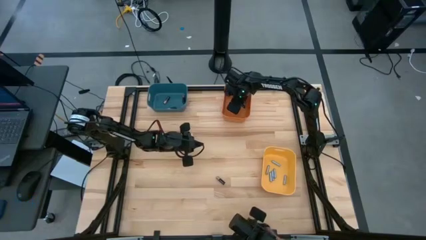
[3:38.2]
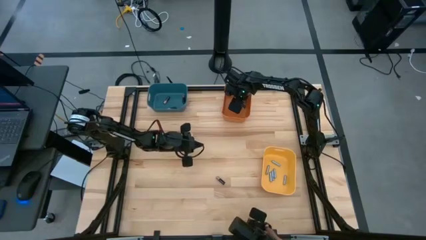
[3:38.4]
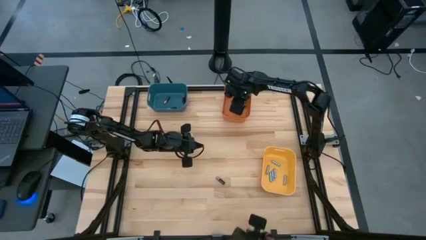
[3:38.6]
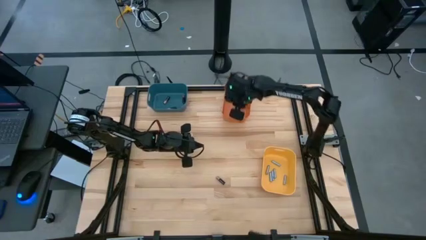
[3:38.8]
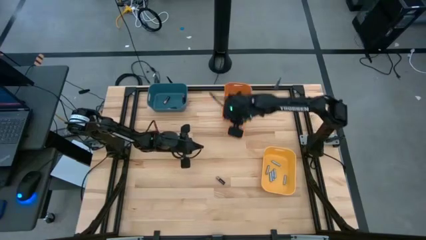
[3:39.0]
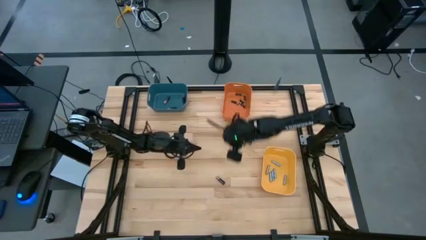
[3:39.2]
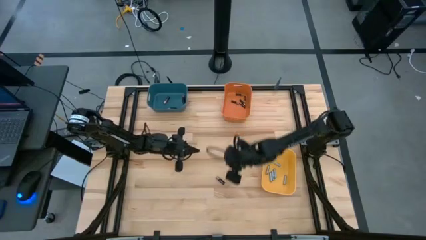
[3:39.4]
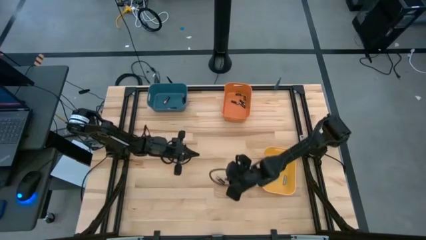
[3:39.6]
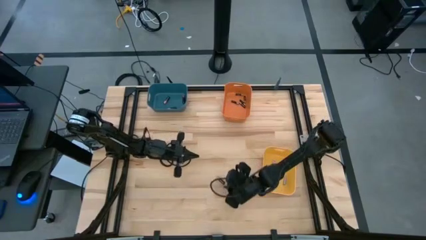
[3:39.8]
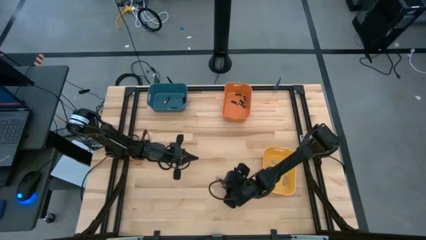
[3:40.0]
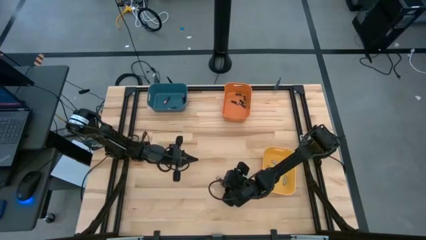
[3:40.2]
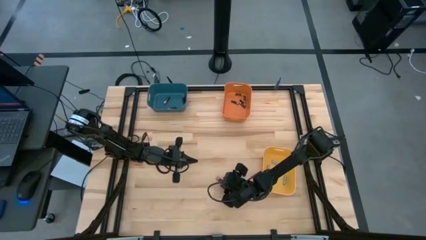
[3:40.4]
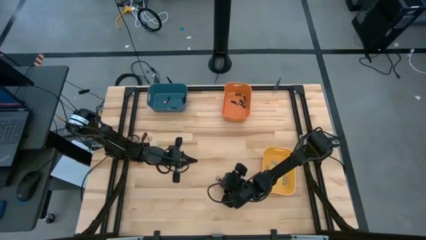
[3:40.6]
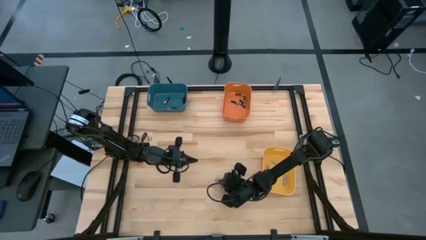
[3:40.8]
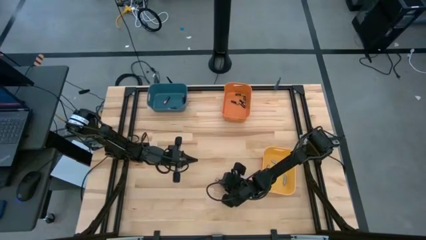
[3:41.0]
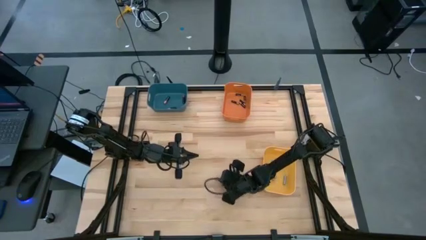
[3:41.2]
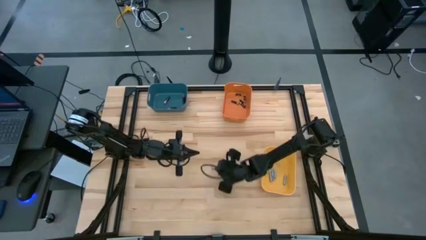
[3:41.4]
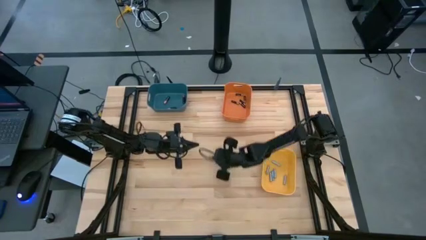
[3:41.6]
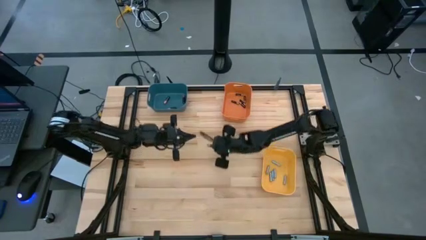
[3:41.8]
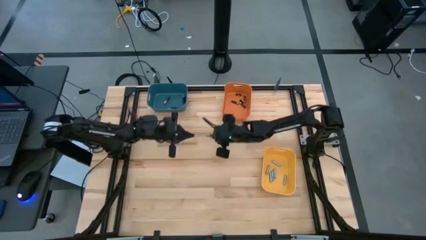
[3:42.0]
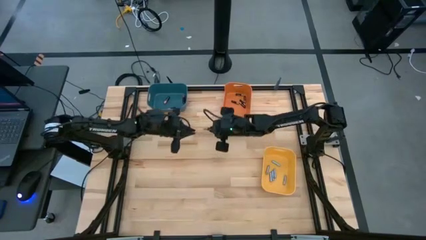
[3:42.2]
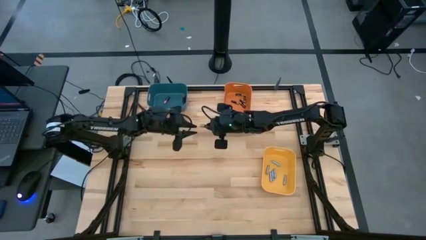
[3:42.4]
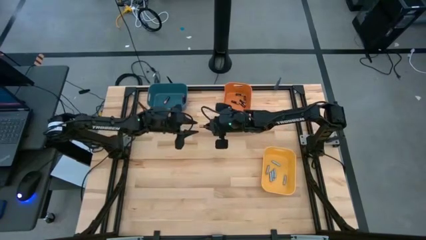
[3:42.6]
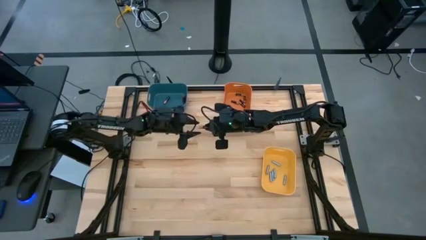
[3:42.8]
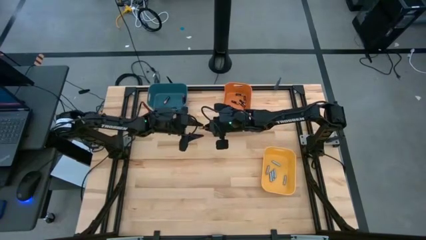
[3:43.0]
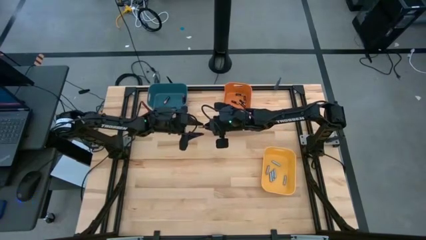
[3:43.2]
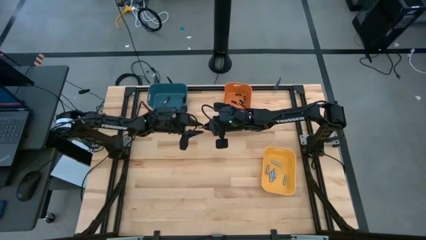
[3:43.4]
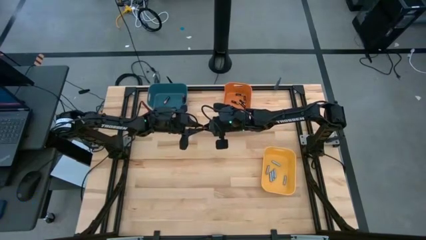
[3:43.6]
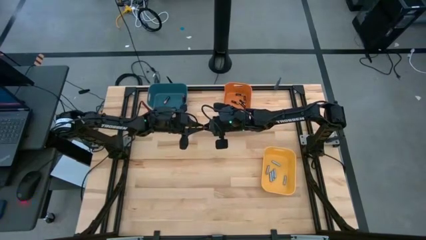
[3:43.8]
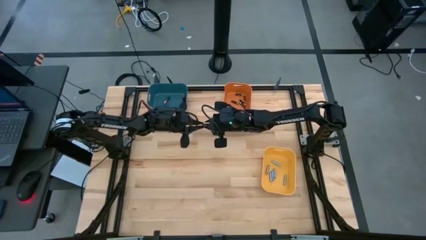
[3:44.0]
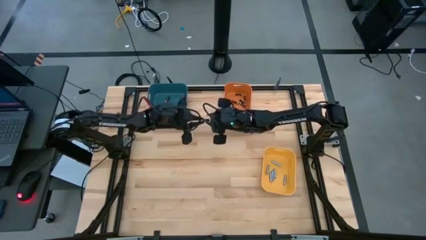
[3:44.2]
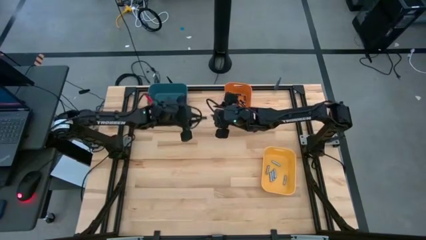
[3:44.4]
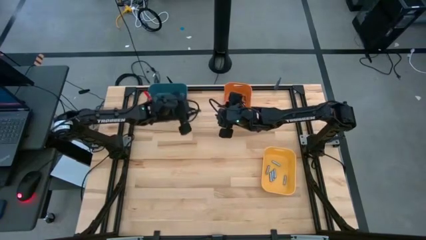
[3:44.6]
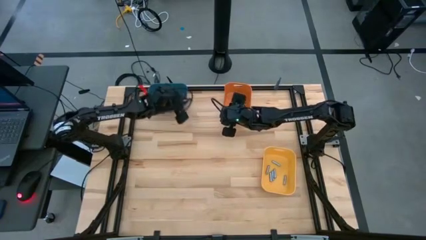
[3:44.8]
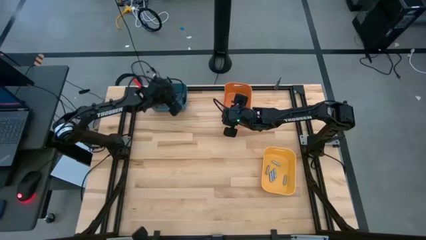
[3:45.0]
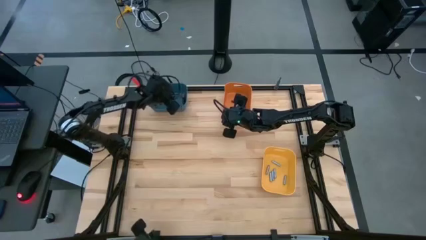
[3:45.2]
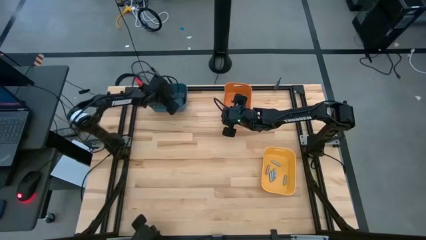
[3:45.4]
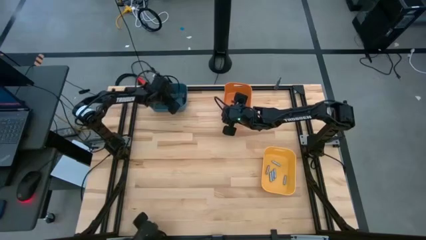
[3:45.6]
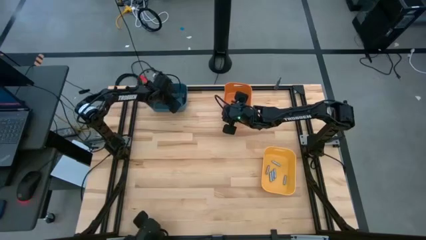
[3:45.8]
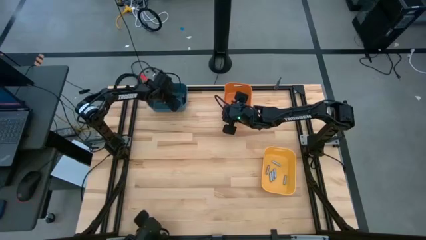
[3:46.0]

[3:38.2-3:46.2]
Task: Sort batteries
Put the big black battery into the blue bin

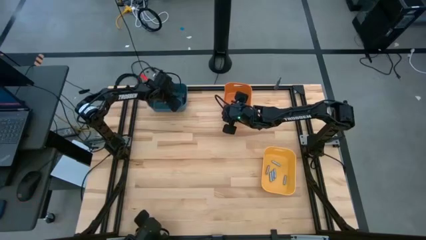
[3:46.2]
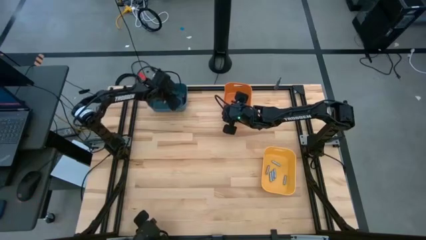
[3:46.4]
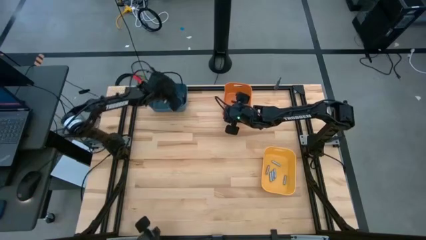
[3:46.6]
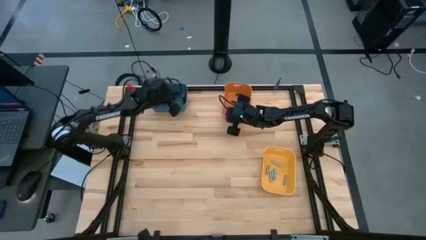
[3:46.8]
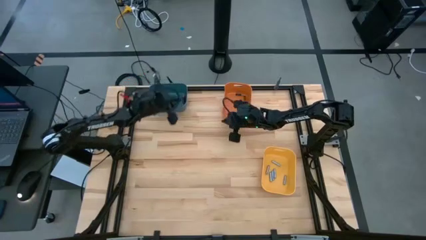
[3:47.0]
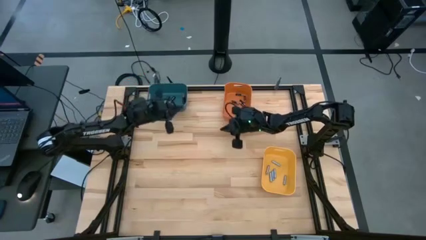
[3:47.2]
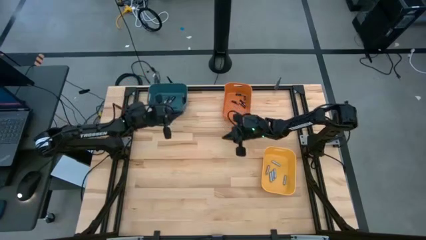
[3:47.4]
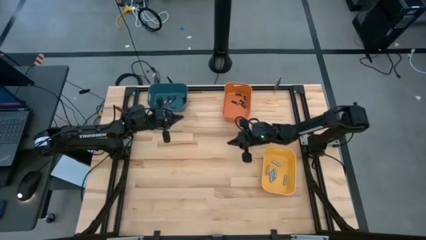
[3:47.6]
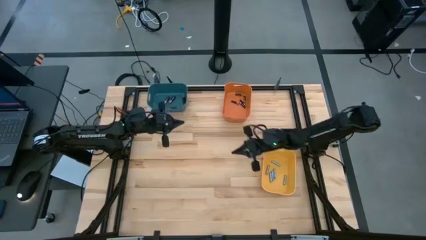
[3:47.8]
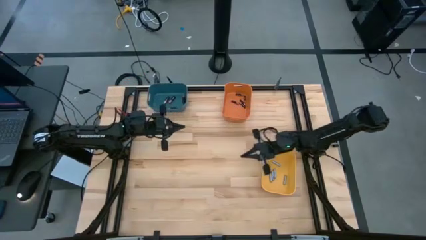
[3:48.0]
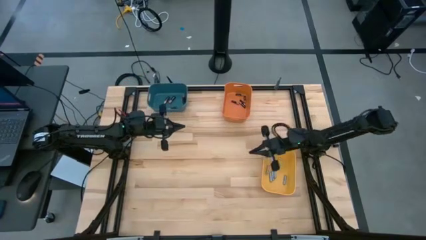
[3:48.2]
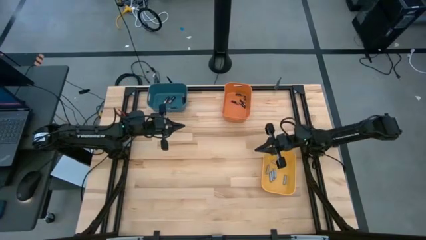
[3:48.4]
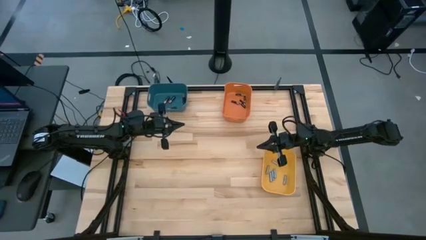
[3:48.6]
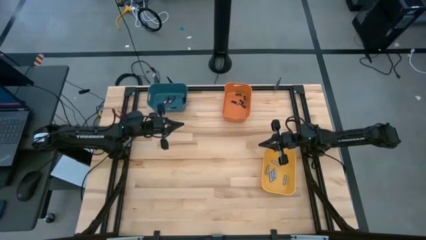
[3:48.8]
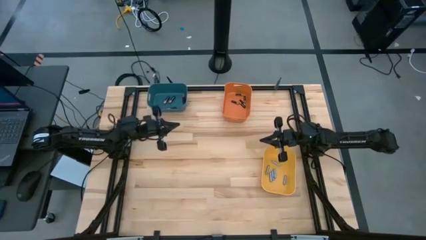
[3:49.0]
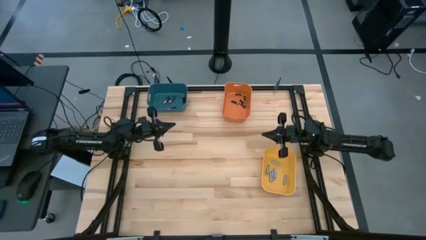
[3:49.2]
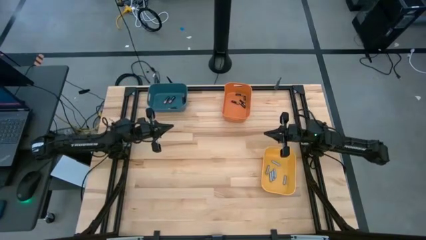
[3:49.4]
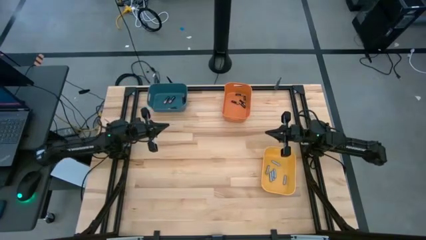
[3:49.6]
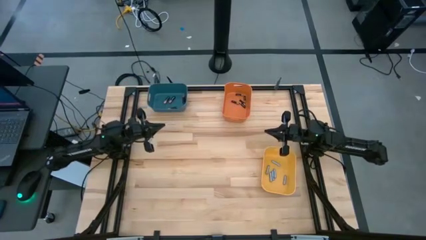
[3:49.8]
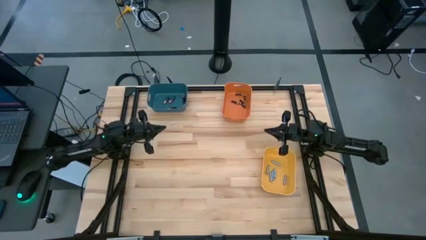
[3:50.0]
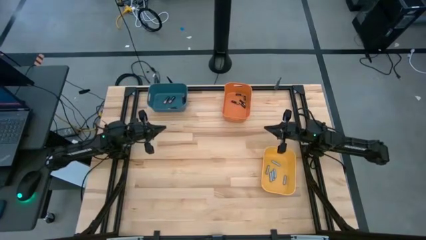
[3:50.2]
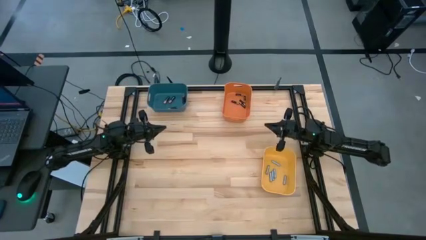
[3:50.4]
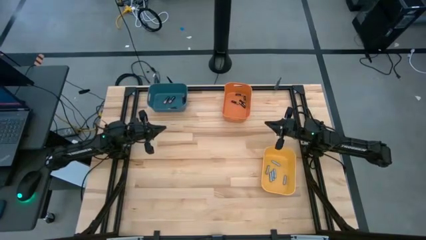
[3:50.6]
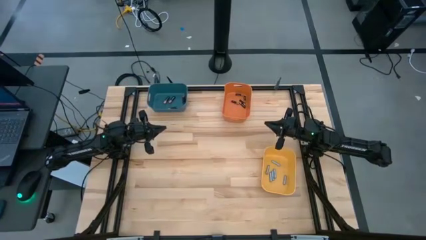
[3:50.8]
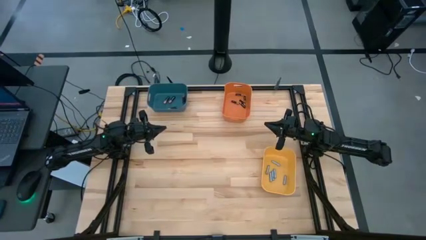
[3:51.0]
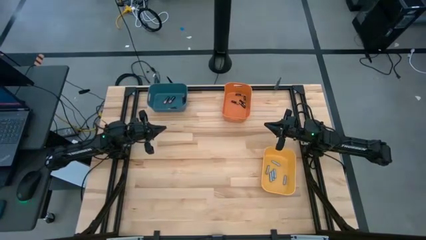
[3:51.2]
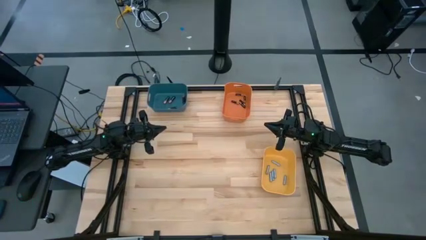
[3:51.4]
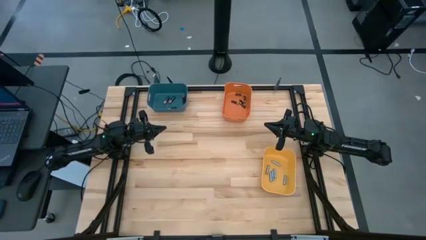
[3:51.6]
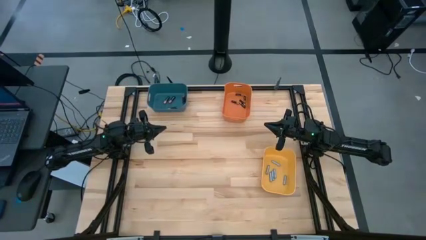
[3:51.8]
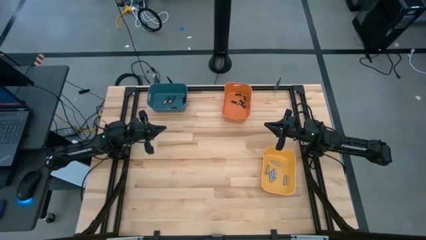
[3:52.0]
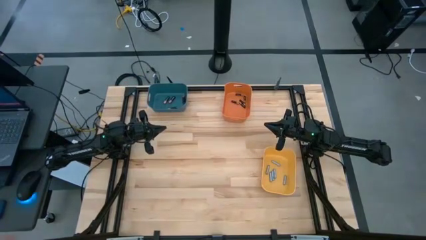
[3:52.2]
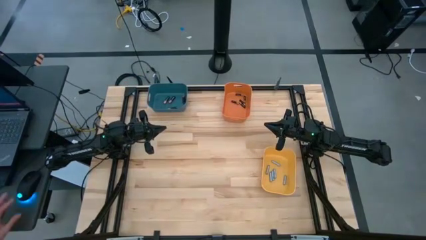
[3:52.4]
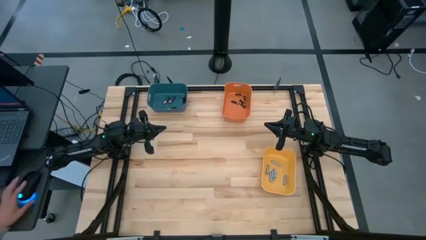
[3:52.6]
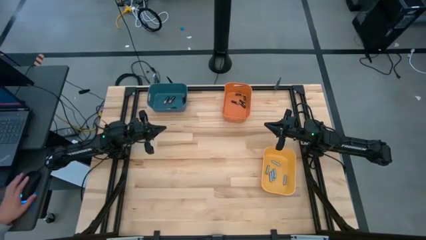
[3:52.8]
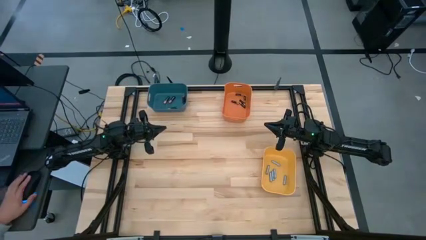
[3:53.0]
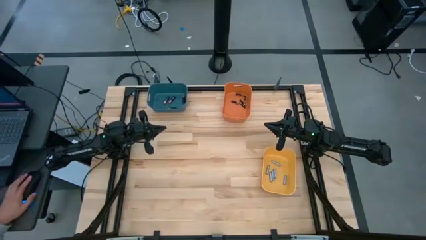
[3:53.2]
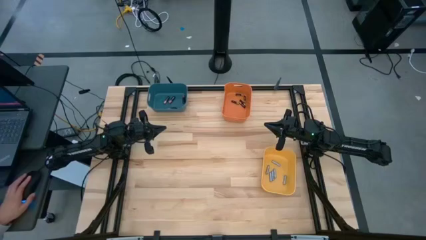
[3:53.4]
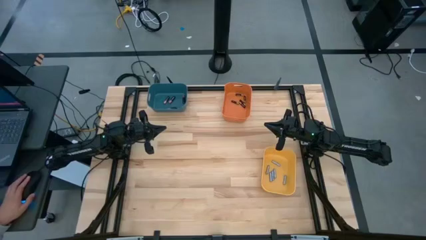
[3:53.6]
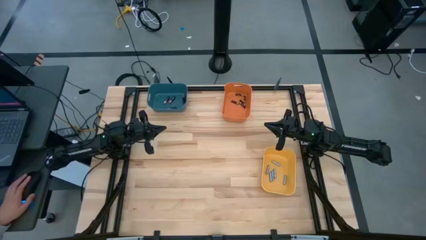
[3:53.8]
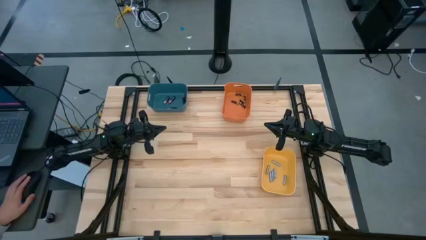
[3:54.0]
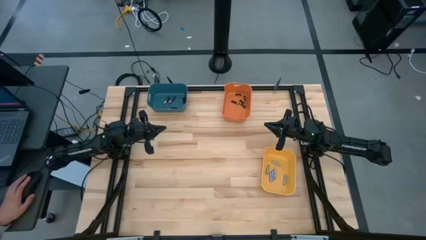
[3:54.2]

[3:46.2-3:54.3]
Return to Home Position
